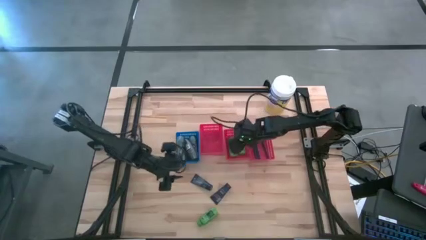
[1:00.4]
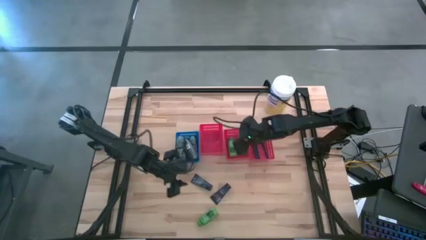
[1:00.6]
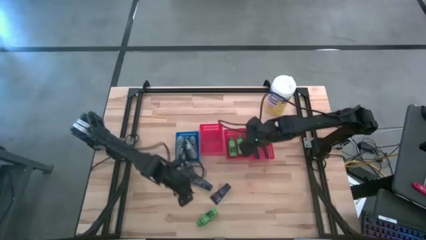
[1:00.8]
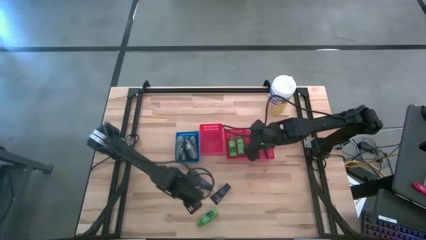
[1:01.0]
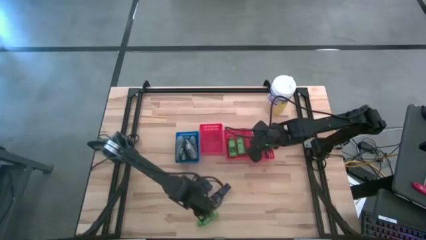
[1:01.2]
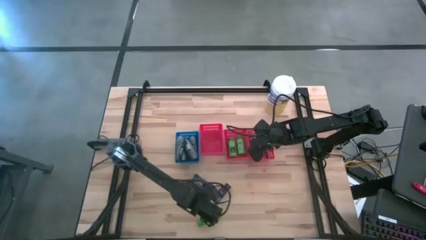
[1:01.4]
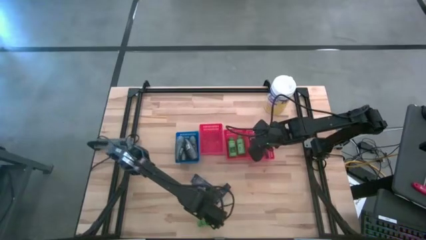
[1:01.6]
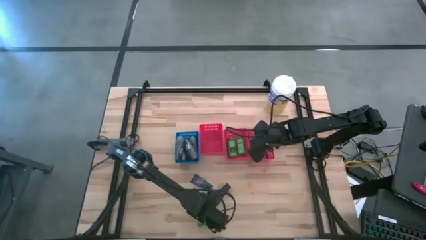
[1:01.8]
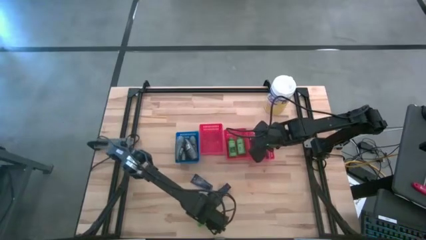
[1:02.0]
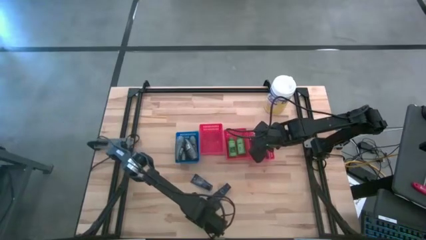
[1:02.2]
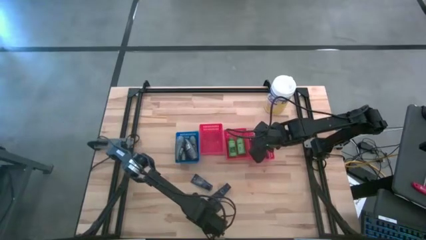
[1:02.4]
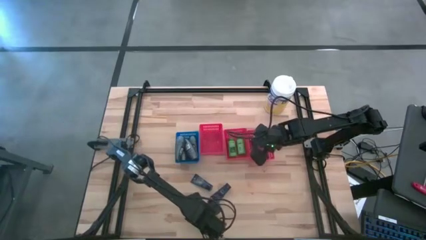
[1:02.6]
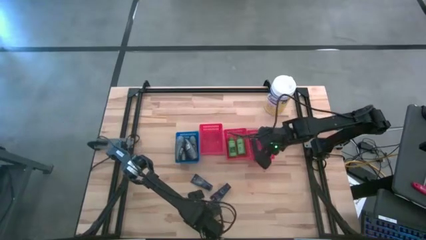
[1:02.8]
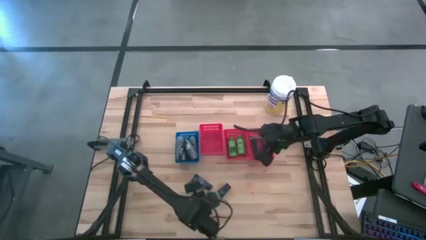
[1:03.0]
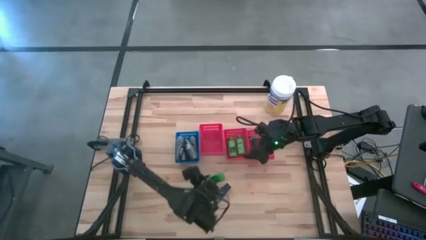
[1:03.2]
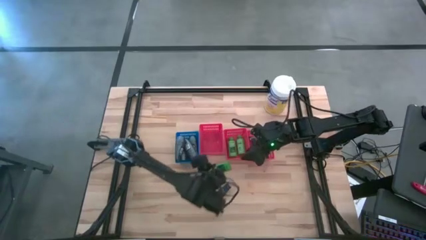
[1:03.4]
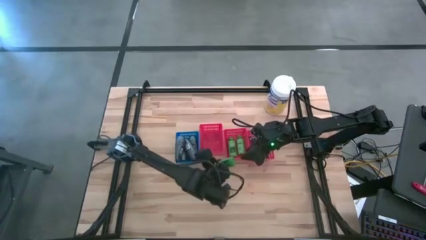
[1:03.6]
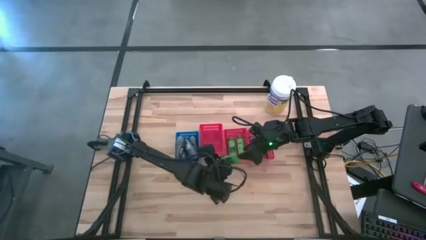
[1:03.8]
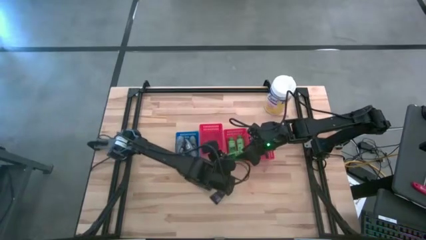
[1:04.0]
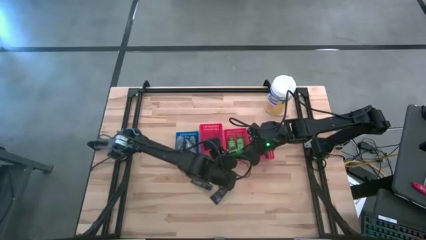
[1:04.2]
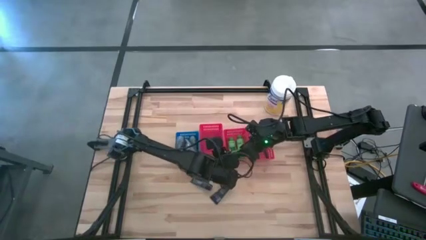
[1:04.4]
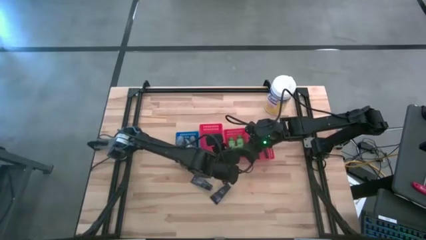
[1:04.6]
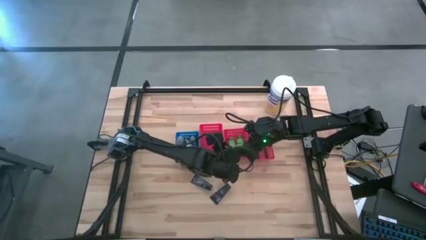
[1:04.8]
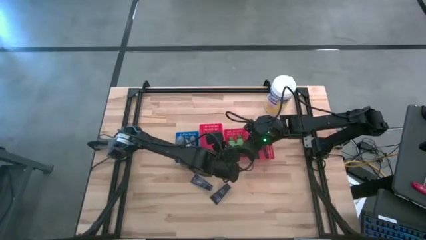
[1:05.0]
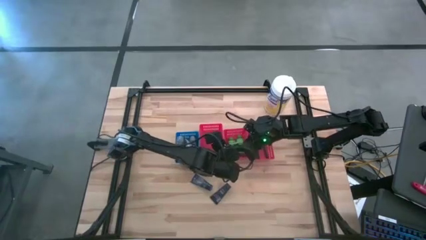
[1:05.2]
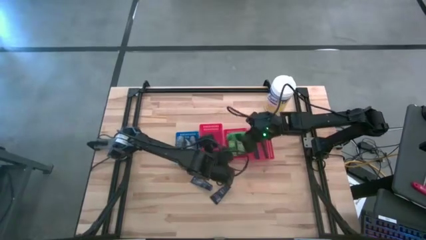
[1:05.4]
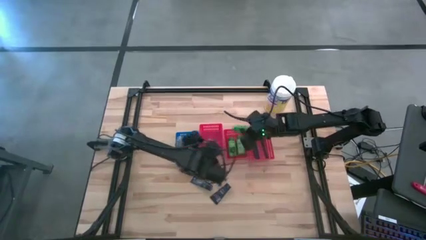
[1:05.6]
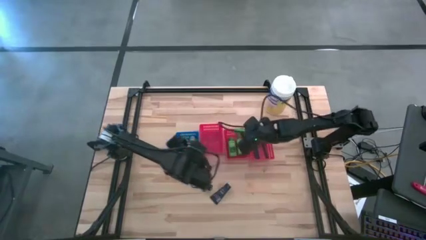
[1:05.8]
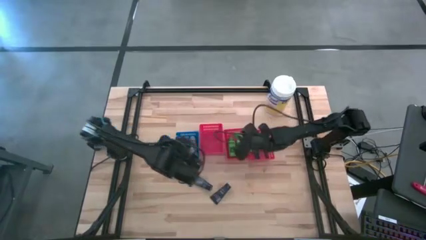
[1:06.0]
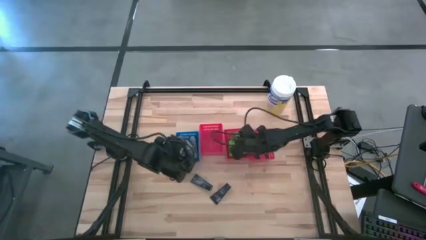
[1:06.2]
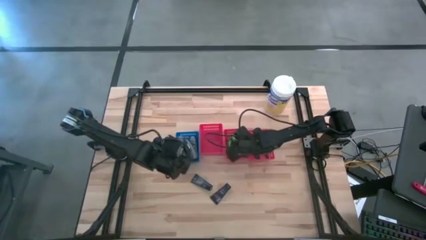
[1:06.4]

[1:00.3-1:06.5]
Task: Pick & Place Travel size toiletries
Put the green shampoo into the middle red bin

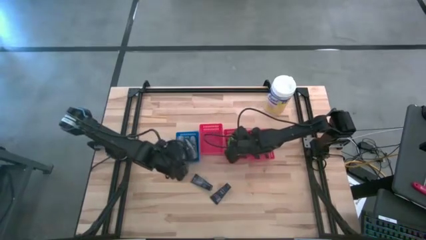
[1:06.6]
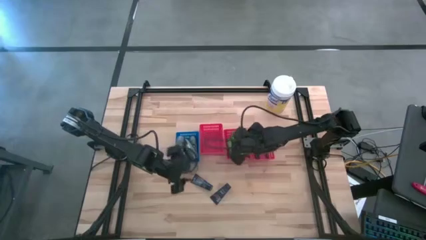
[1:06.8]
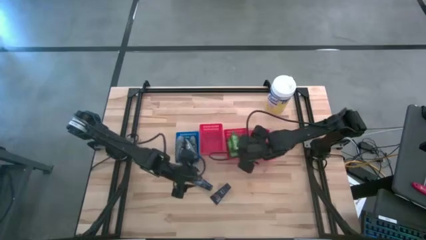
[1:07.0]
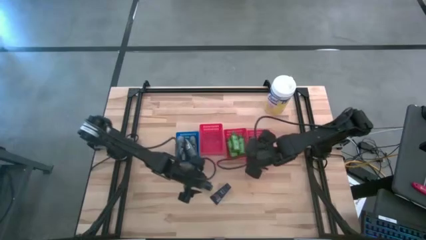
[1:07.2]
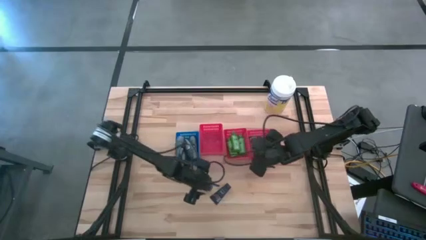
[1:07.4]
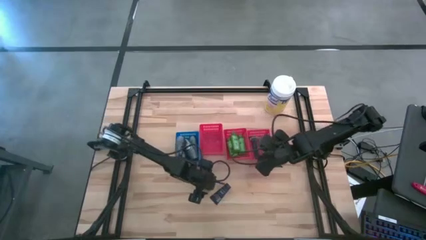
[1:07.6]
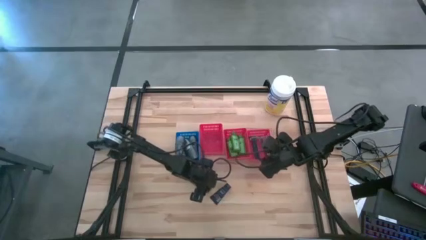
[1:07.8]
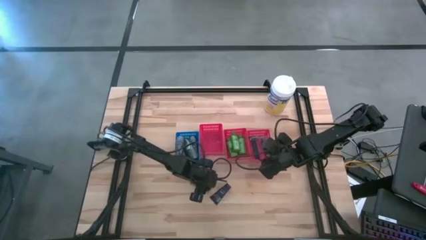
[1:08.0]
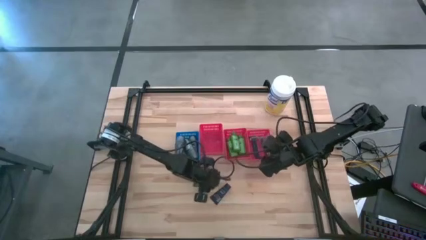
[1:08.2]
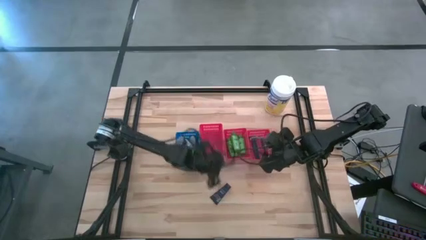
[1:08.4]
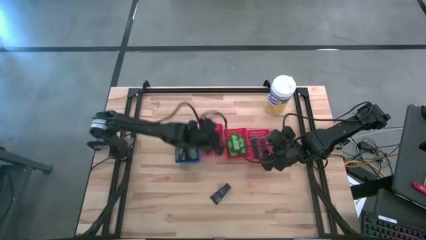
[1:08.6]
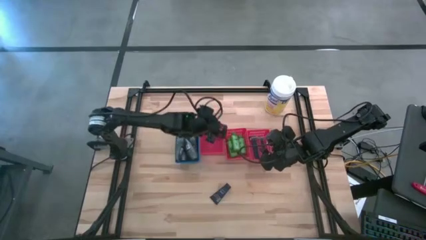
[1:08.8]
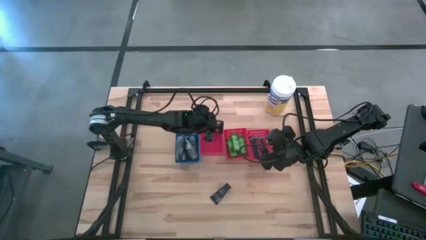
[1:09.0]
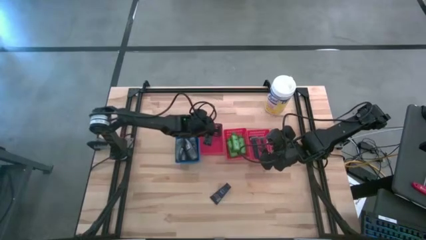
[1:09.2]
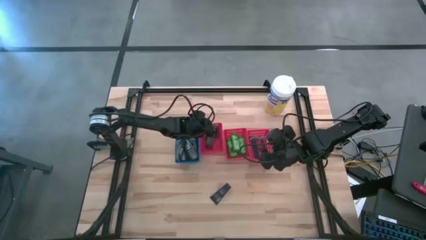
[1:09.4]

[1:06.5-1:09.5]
Put the blue shave cream into the left red bin

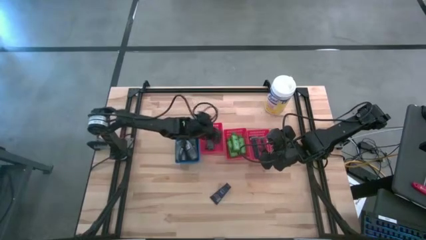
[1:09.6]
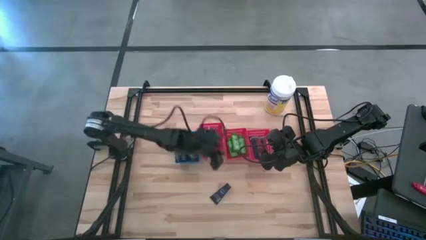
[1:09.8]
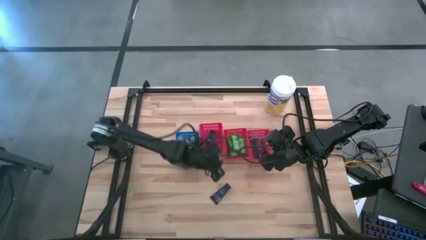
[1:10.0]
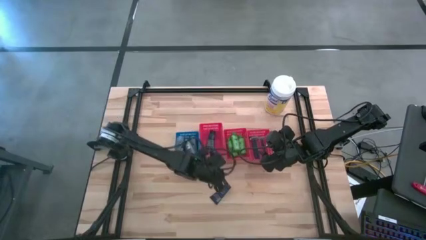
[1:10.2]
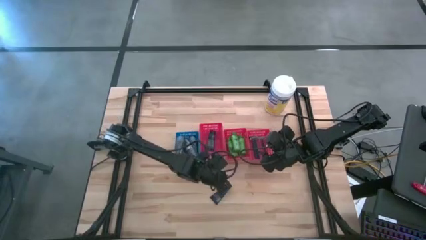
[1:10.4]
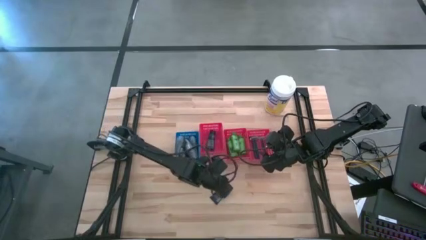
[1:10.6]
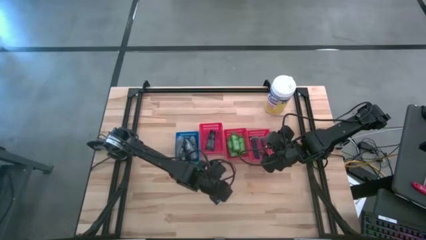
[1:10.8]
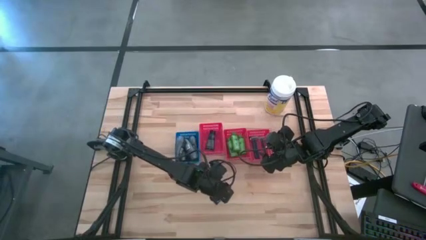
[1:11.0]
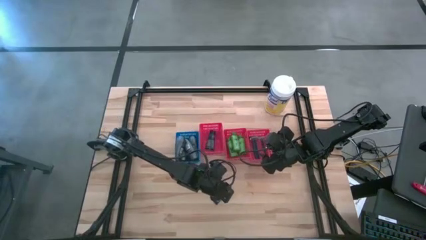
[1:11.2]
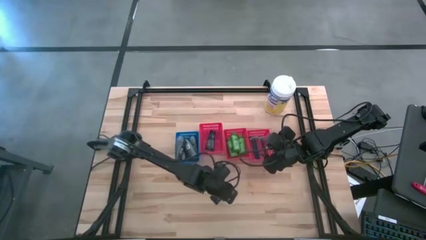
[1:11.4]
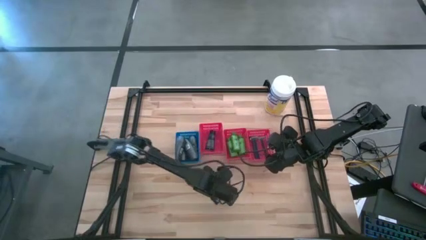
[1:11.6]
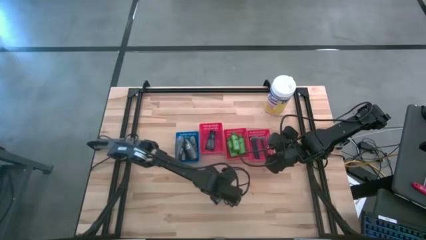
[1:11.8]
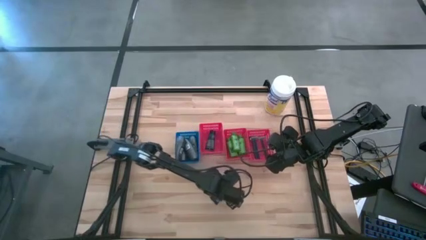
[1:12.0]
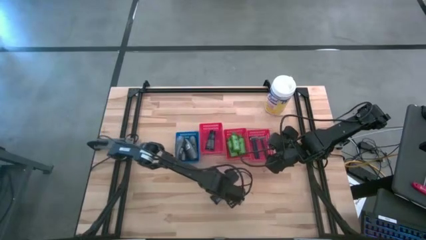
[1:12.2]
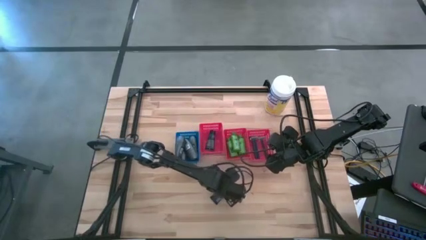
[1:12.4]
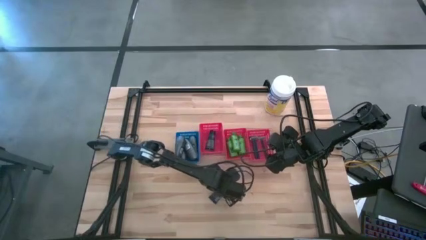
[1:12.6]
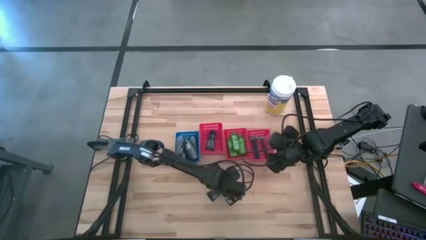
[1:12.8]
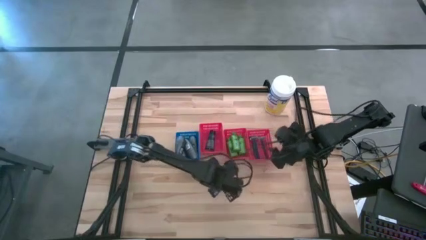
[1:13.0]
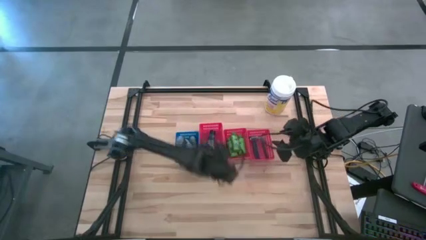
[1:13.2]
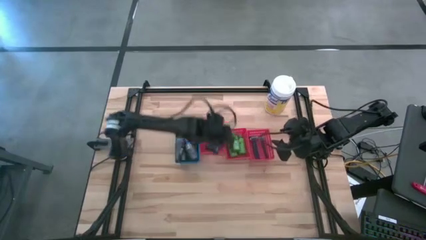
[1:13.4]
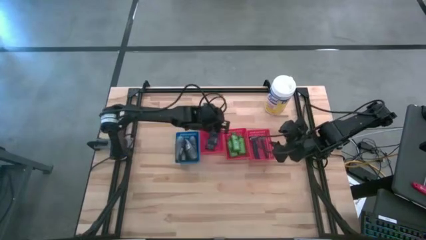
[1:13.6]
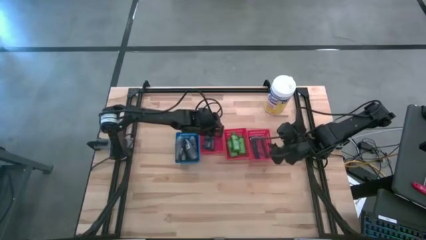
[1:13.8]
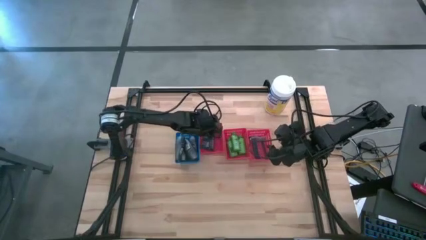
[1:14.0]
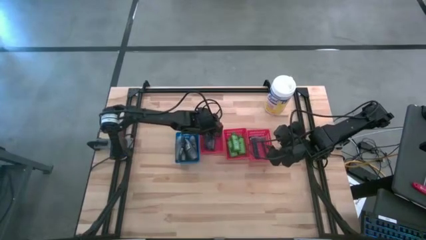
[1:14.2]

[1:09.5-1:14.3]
Put the blue shave cream into the left red bin

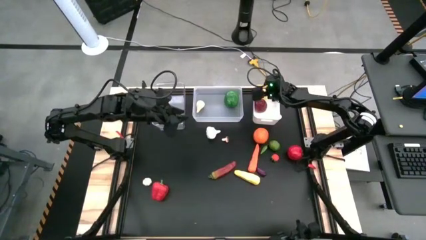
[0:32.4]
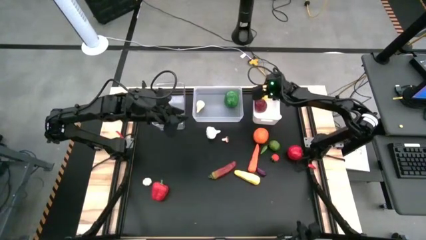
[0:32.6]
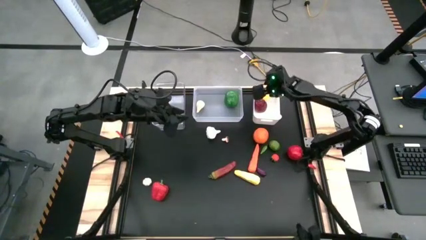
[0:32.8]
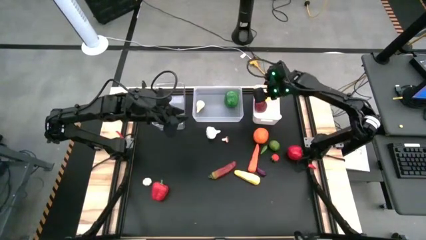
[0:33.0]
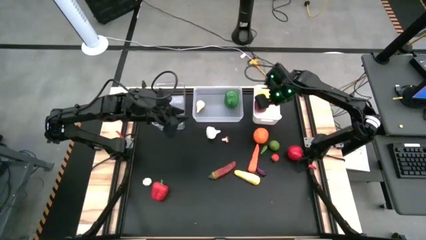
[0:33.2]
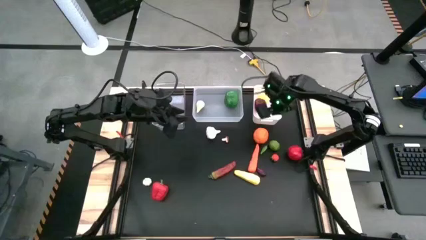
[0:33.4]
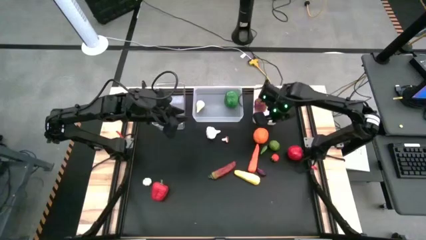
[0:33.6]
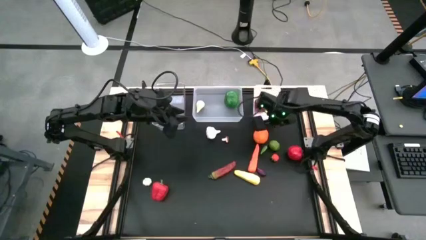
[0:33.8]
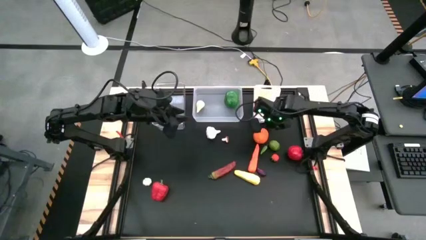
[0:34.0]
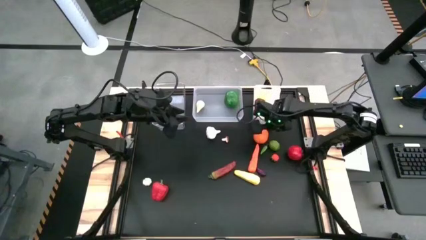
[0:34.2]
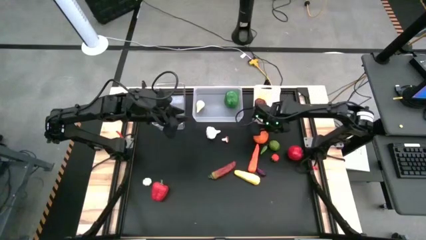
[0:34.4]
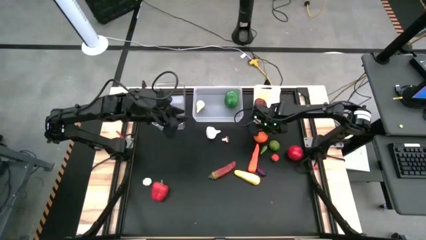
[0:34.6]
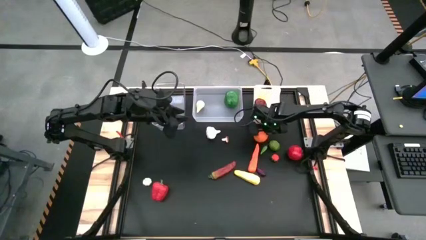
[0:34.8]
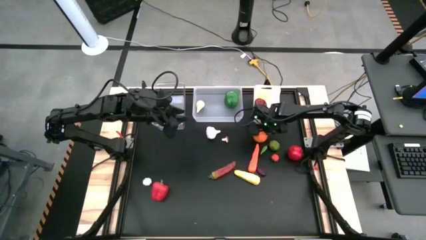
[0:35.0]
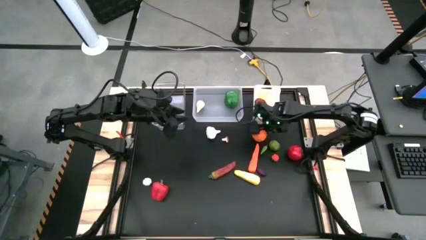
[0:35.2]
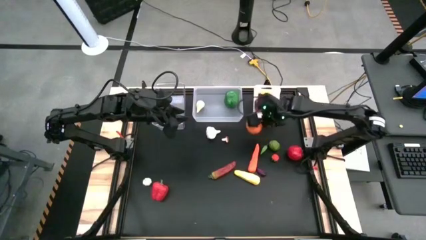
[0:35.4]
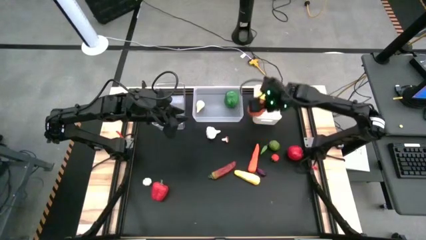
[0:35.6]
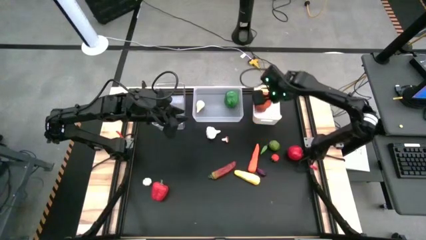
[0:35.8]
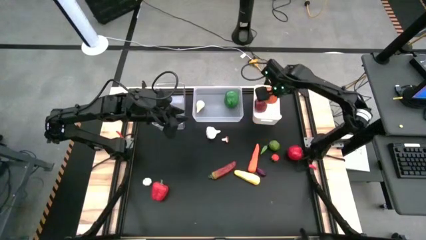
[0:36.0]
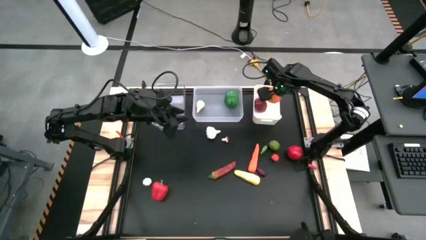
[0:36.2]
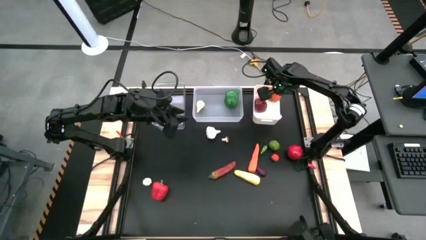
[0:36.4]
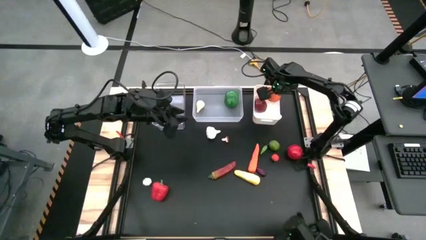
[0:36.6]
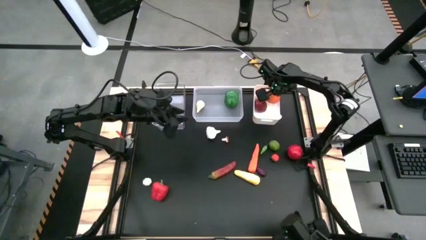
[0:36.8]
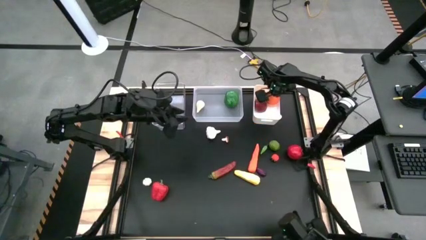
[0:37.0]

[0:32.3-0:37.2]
Task: Sort produce into baskets
Put the orange into the white bin
